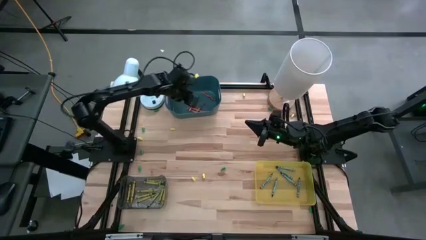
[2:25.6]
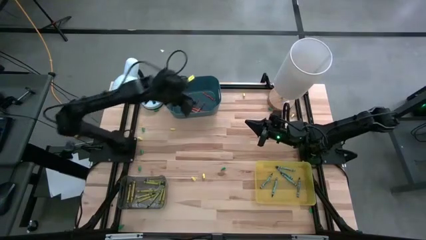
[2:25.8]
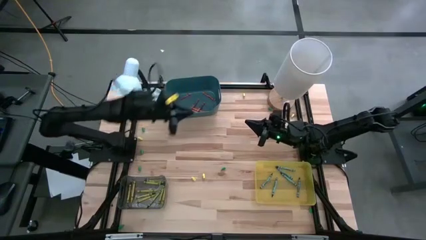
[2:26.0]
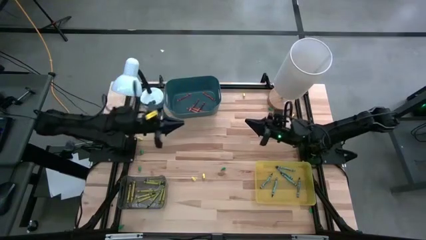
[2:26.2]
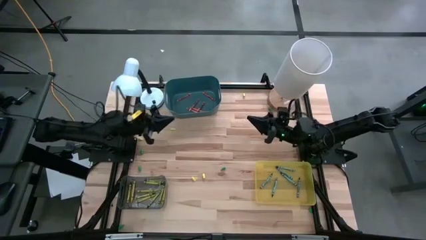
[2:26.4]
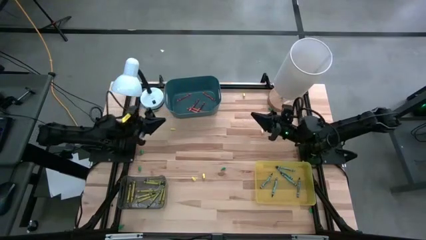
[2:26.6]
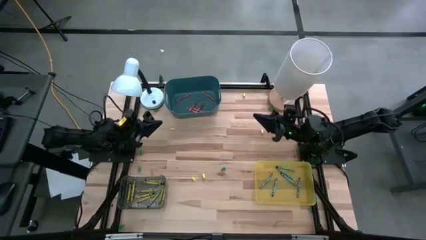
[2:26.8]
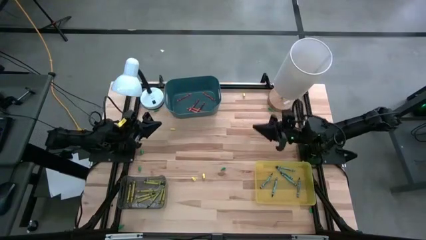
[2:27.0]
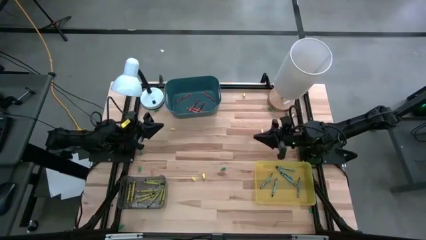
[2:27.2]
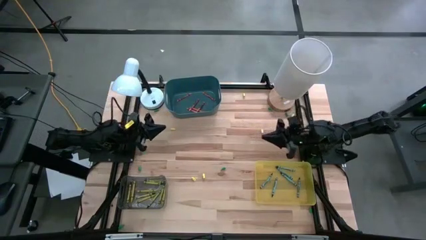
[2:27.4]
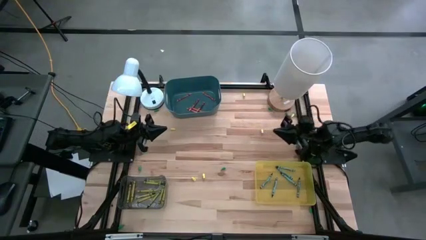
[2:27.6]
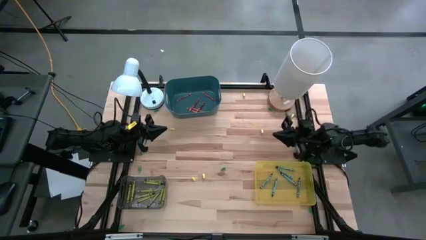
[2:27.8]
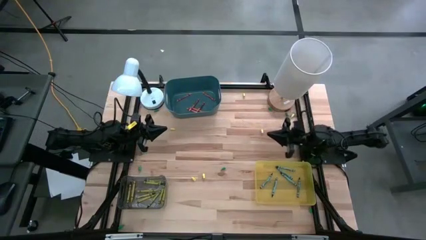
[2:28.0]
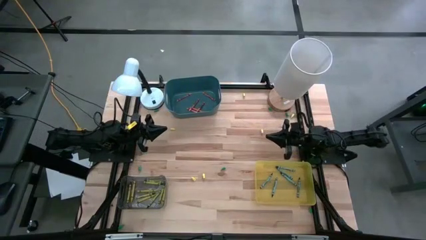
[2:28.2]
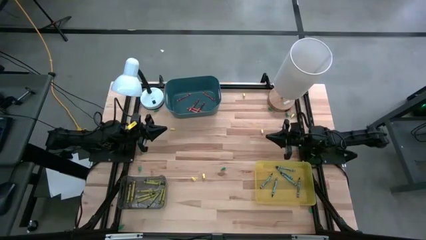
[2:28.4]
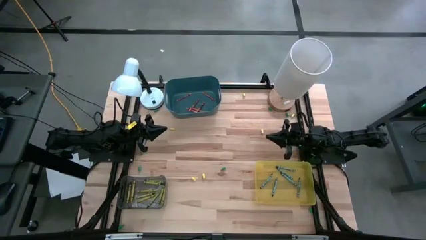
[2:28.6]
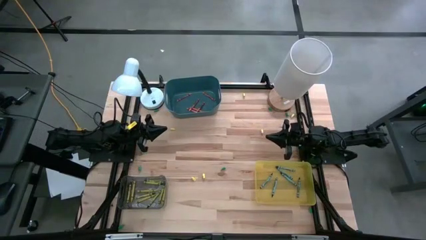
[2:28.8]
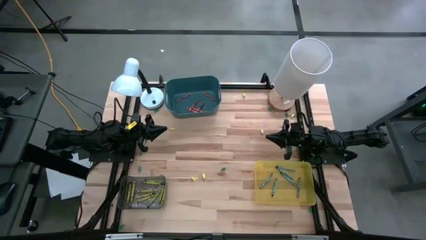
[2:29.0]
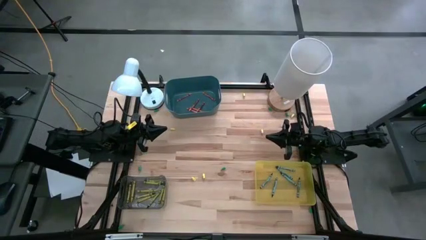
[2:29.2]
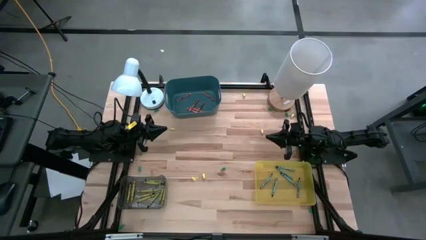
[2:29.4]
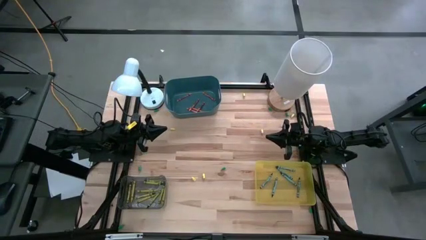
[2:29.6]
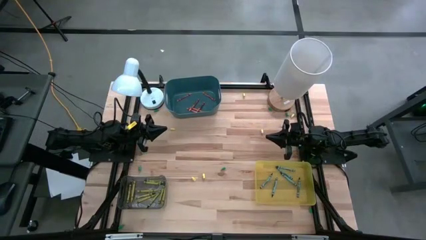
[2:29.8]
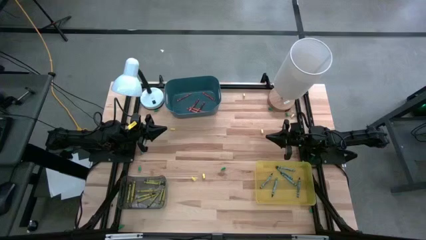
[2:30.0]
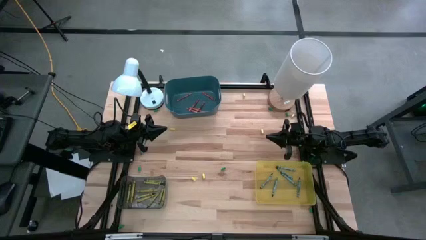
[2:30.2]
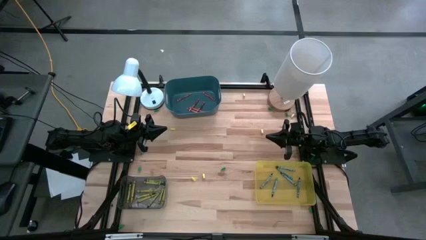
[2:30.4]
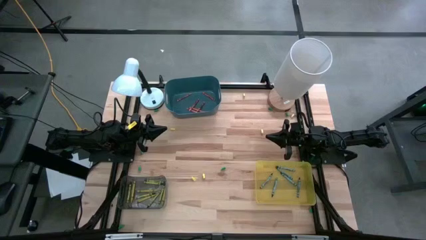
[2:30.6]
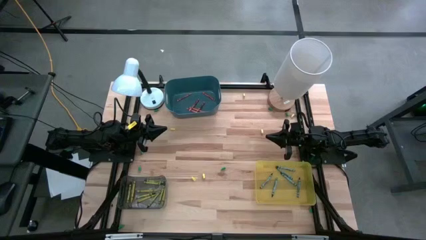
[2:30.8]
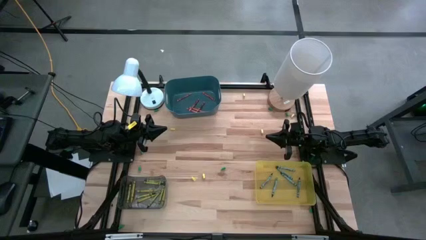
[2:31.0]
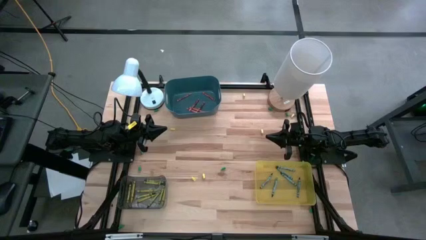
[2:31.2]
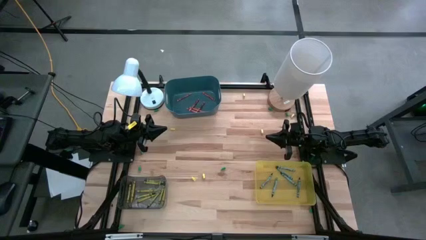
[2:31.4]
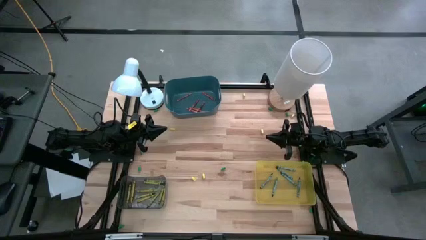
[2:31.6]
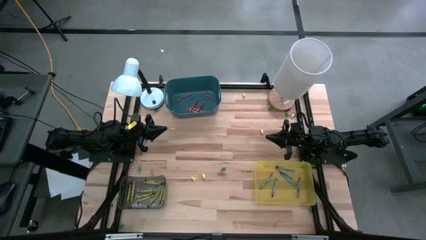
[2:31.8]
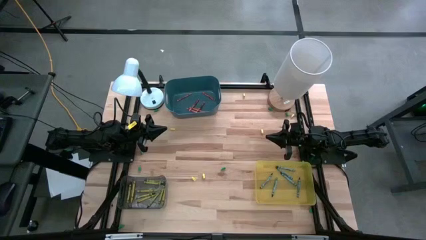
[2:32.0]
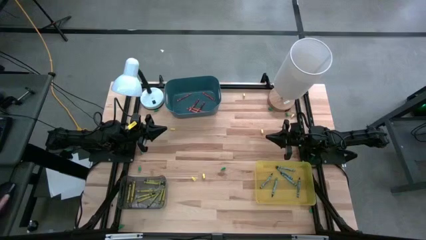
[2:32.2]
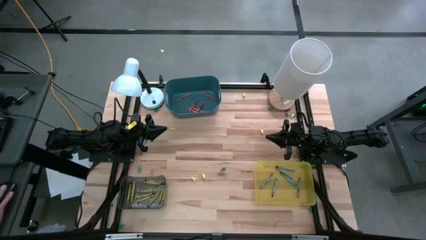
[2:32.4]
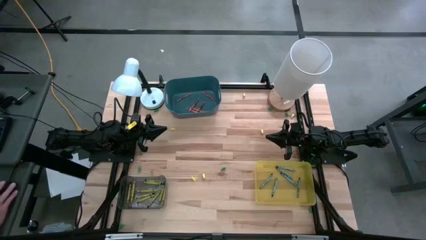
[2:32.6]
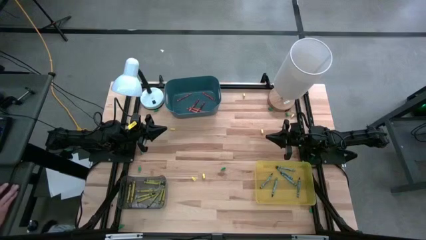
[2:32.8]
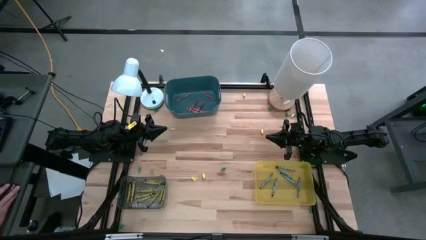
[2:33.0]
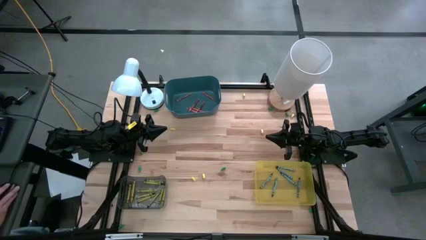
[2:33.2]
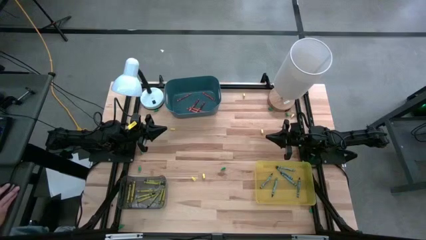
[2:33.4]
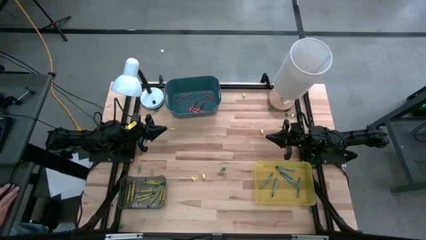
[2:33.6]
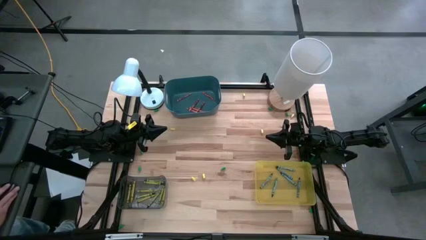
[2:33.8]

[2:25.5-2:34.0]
Task: Sort crayons
Return to Home Position

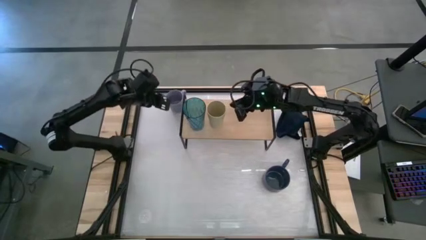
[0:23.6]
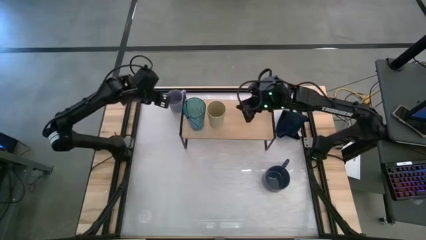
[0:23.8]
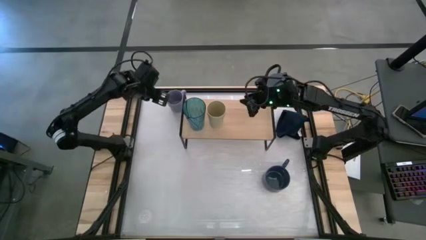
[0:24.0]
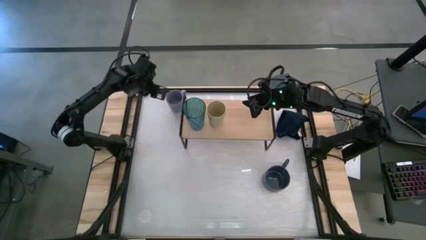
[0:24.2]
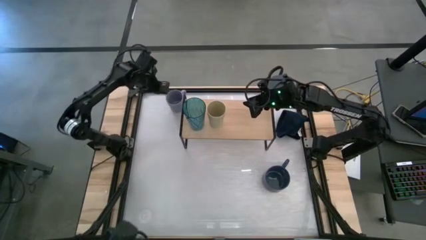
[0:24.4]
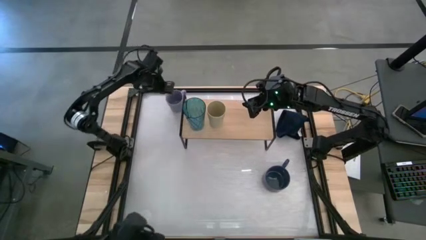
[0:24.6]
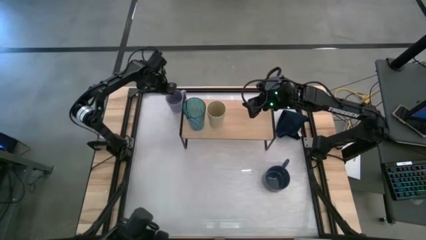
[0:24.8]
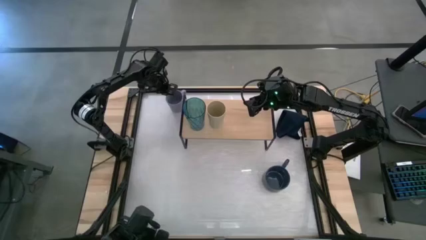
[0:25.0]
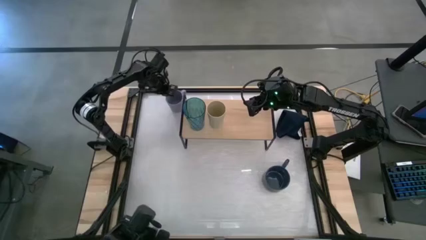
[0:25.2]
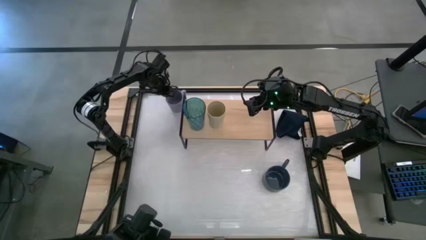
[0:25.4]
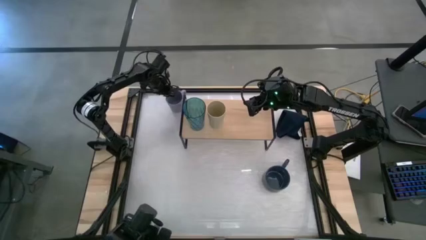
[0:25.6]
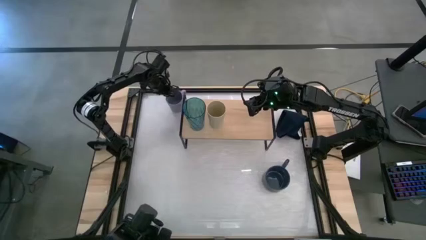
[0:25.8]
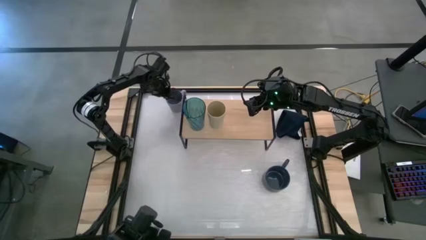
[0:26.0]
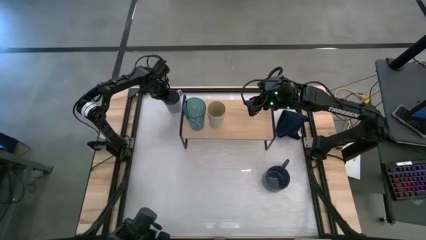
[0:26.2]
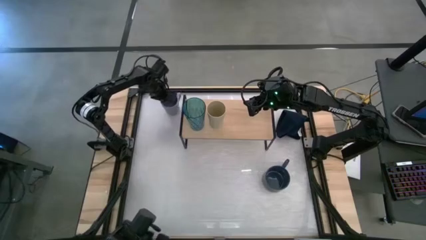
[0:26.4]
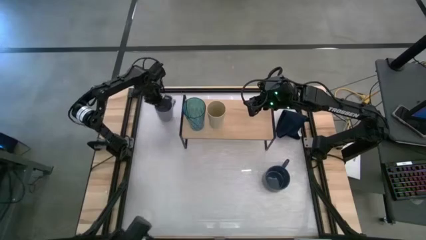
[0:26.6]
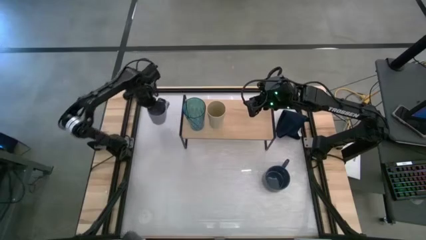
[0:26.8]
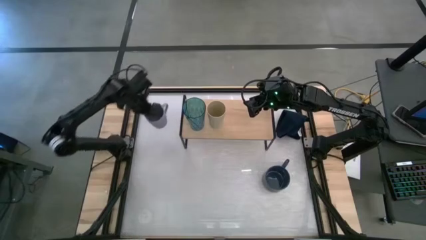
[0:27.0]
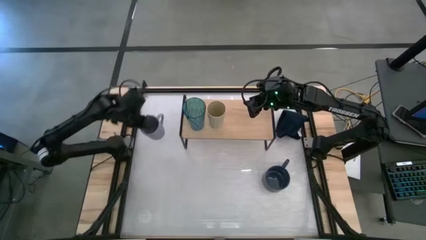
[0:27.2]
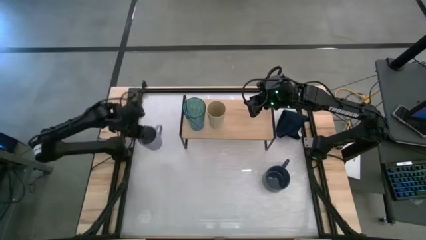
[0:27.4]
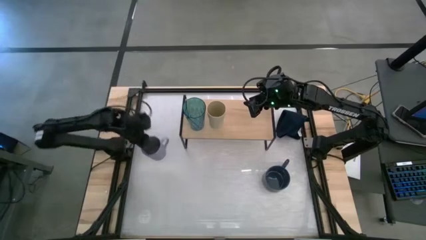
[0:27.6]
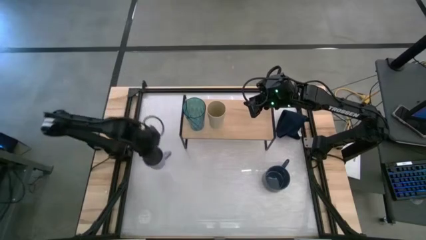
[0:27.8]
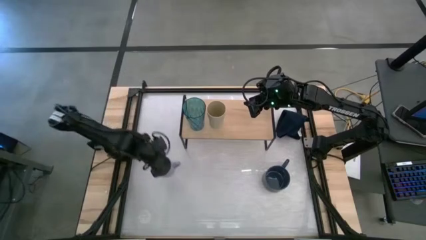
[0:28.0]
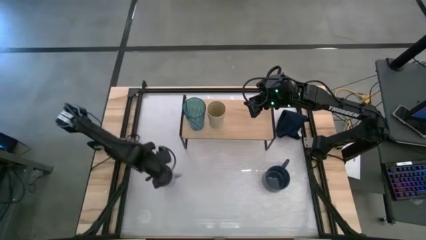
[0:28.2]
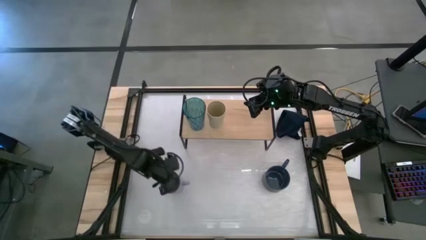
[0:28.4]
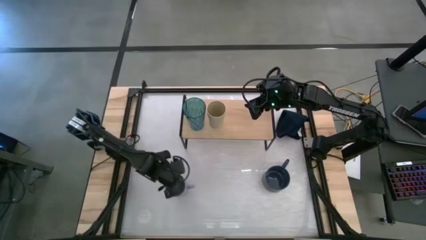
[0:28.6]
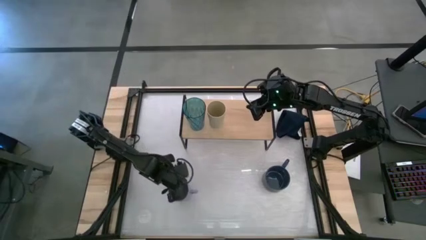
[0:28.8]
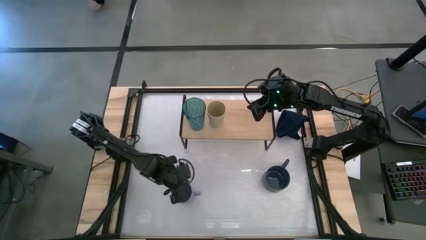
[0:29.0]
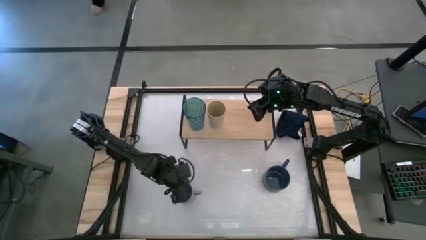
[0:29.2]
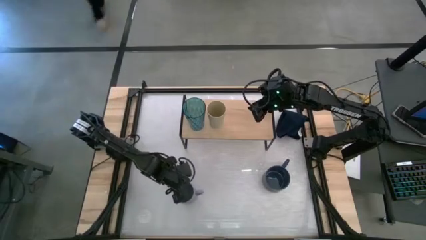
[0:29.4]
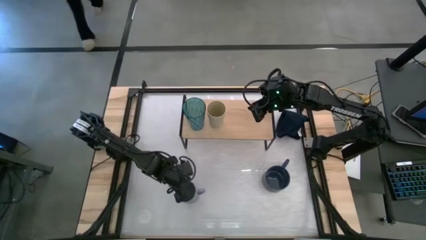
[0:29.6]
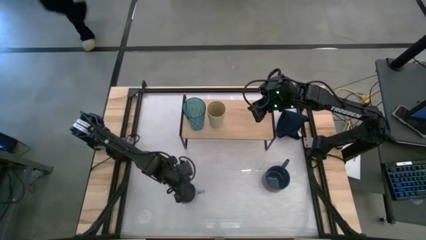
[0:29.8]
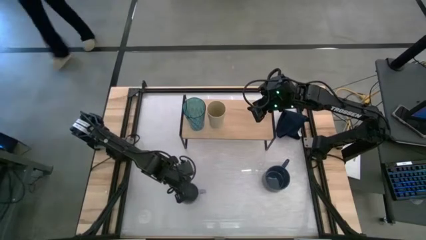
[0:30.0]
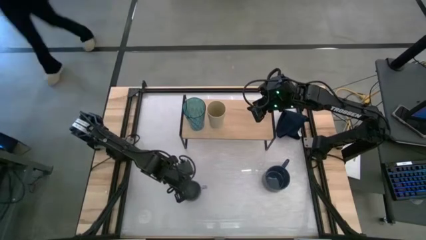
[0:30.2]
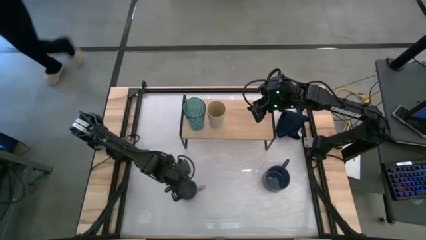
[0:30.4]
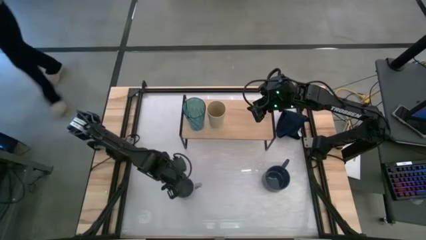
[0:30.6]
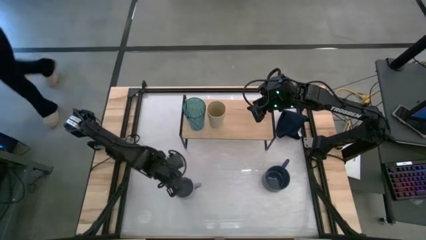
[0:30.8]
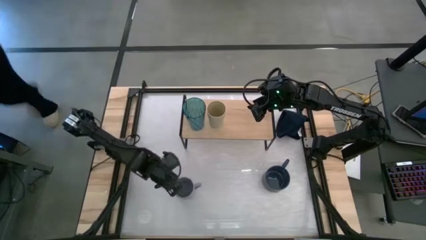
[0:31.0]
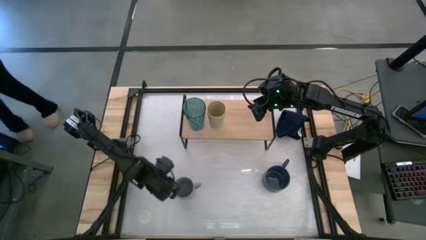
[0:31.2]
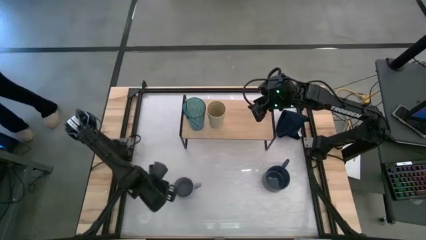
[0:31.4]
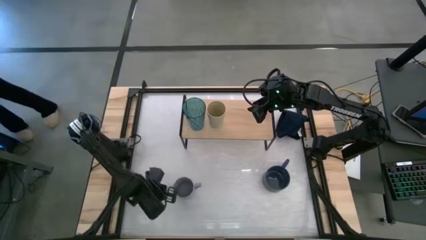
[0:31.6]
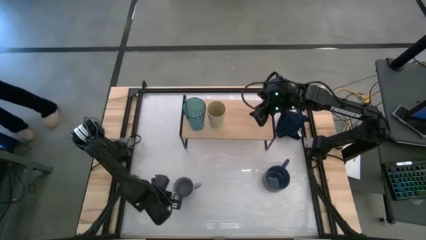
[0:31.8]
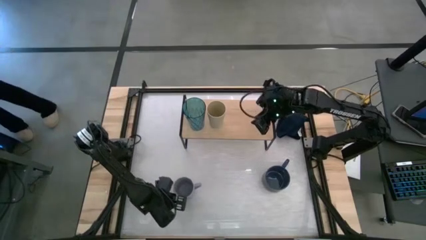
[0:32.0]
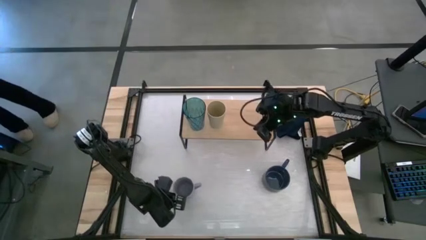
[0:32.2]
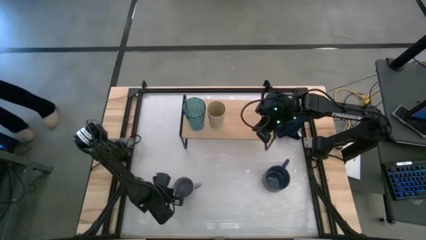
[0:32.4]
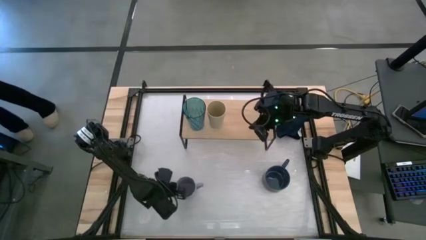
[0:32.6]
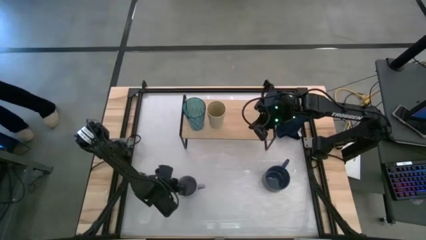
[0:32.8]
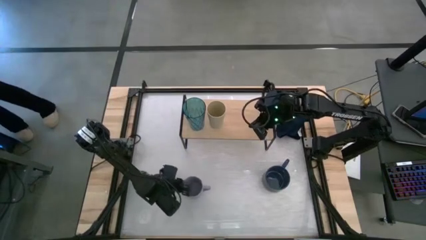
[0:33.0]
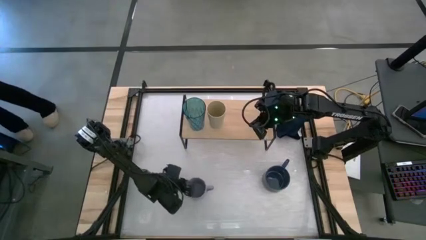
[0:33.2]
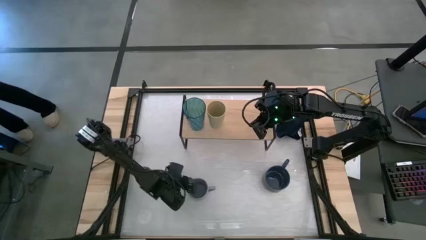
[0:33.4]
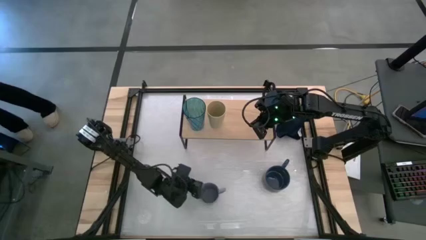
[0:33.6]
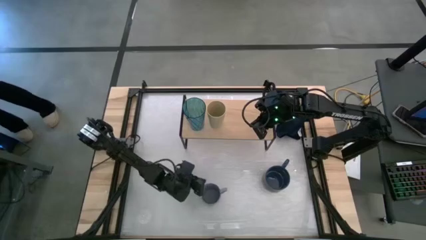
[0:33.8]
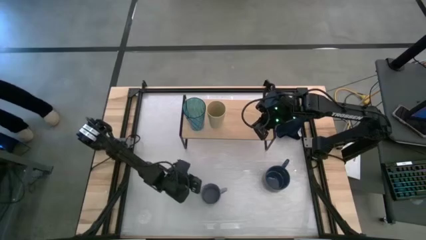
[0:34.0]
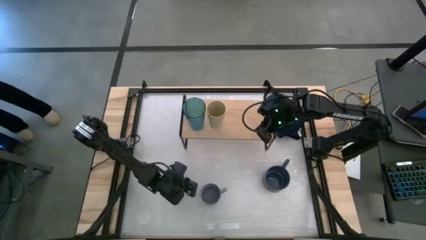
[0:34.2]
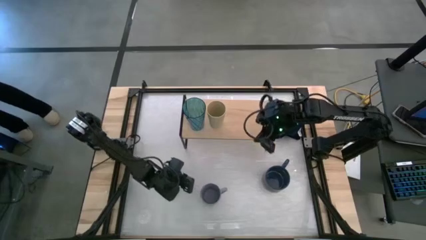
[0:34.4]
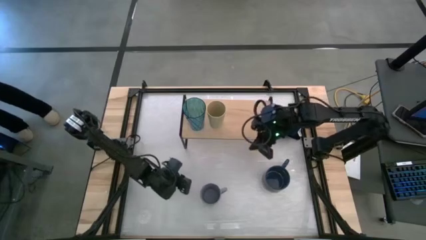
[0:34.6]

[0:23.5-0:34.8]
Task: Stack small to large cups/mugs on shelf
Put the purple mug on the shelf
